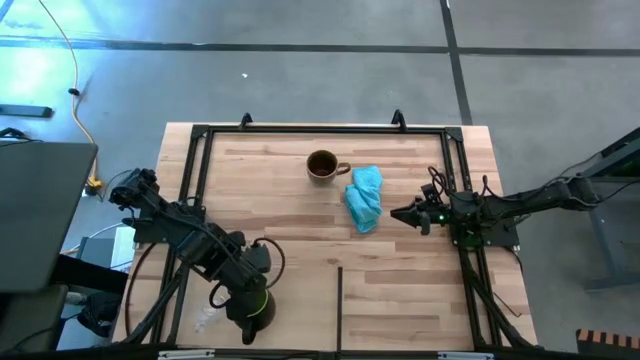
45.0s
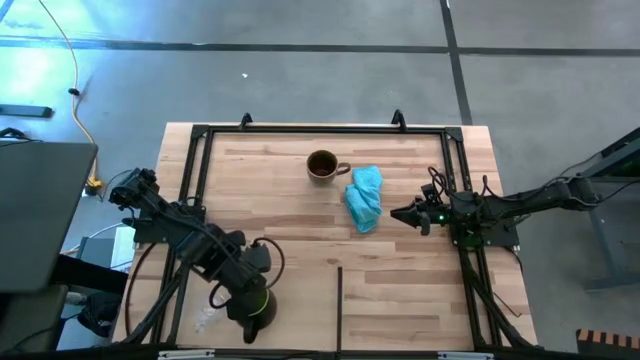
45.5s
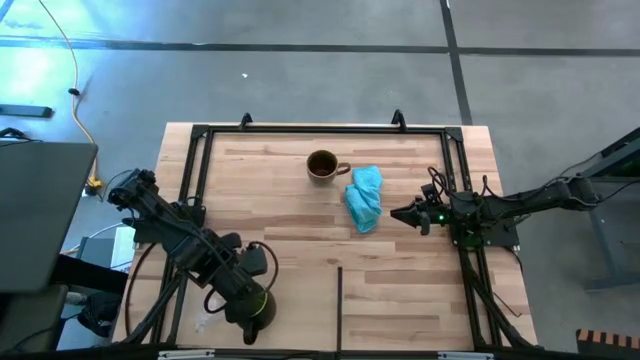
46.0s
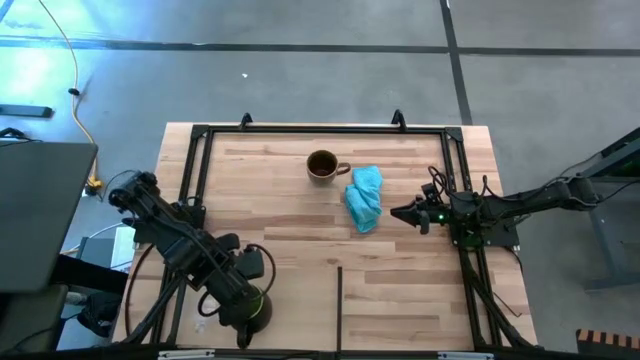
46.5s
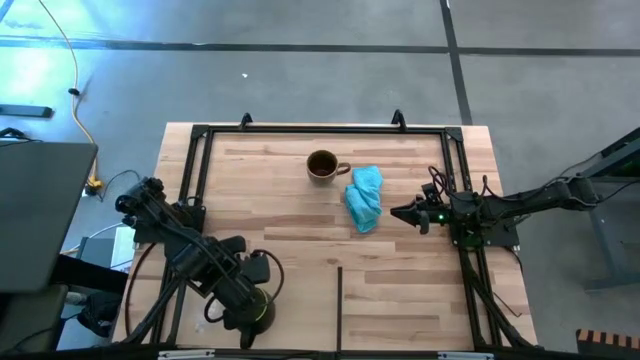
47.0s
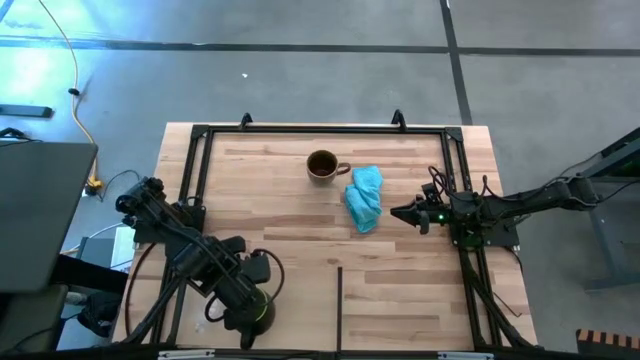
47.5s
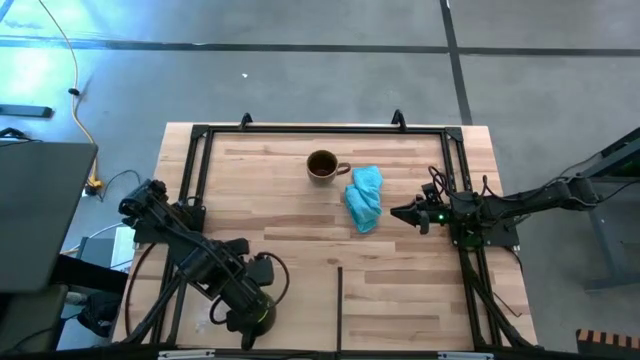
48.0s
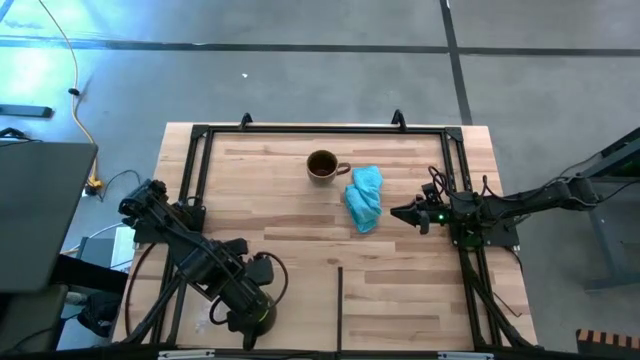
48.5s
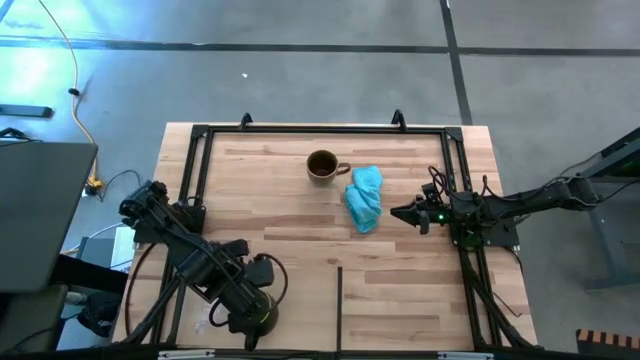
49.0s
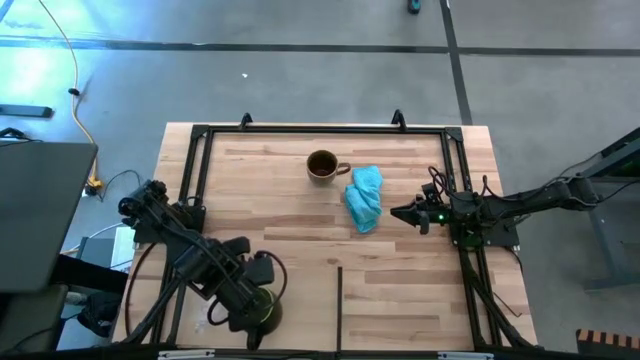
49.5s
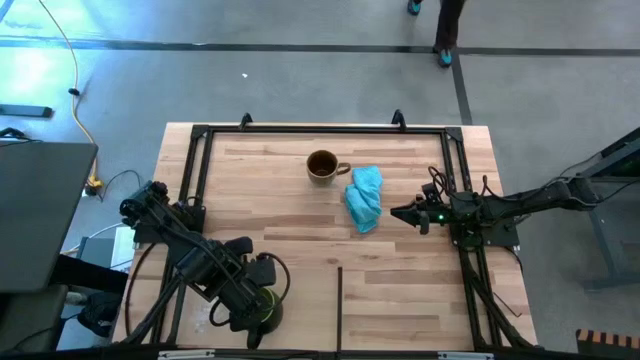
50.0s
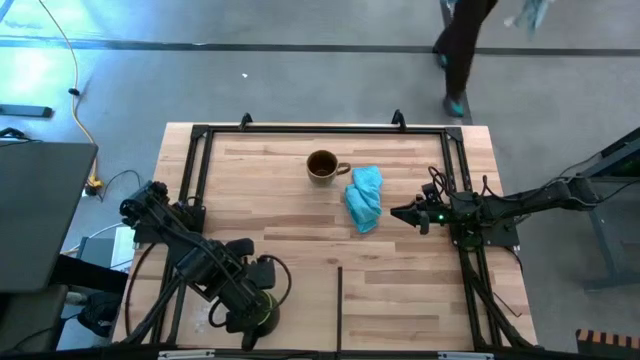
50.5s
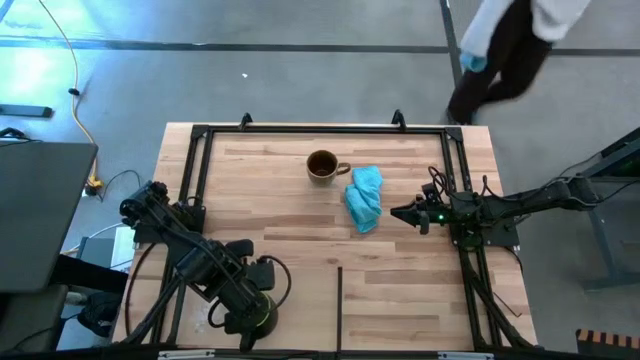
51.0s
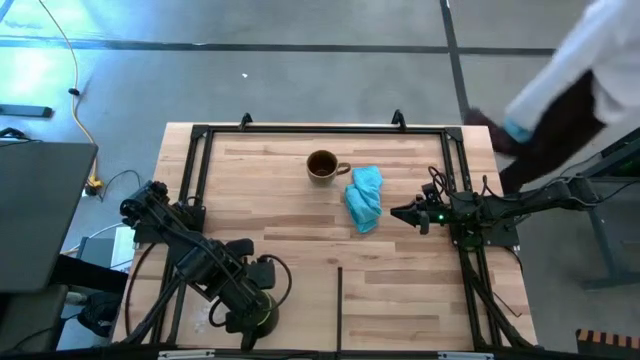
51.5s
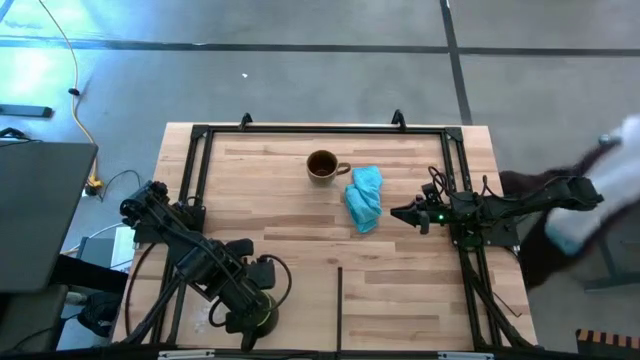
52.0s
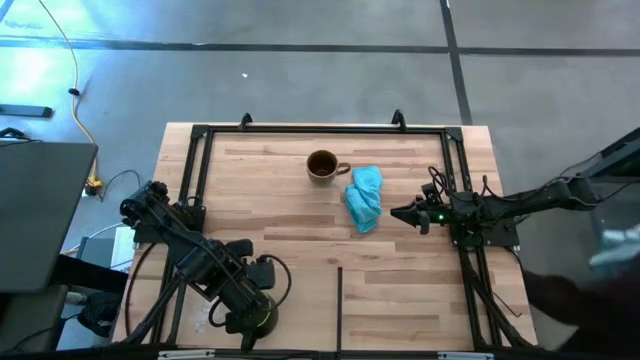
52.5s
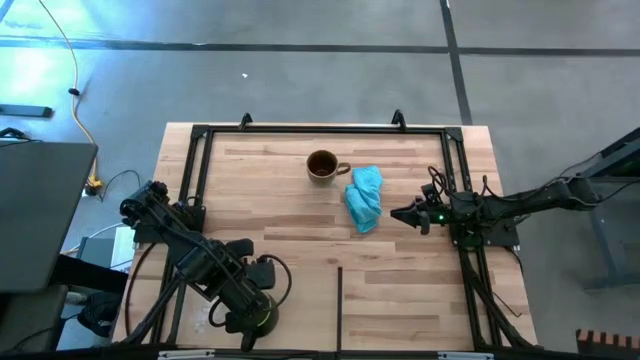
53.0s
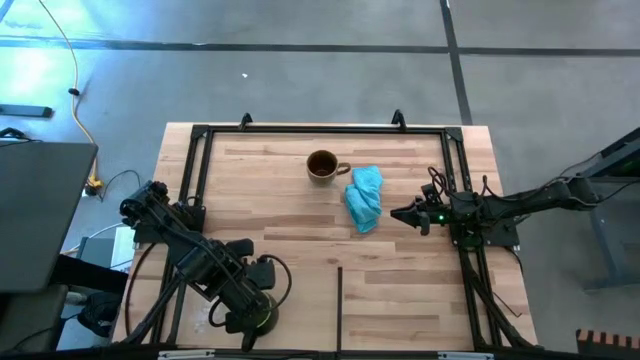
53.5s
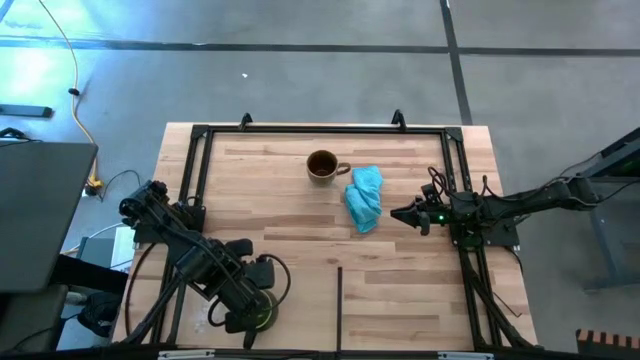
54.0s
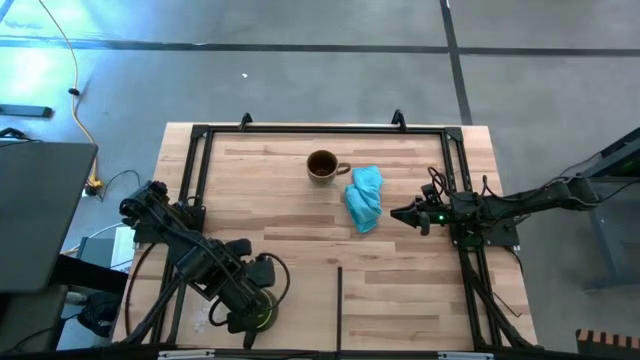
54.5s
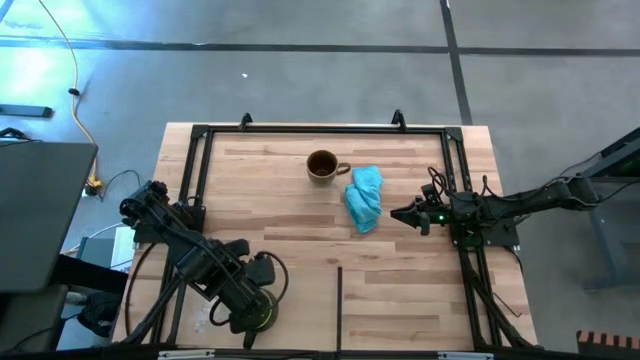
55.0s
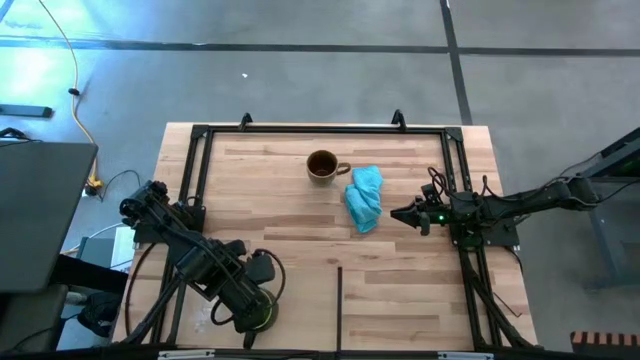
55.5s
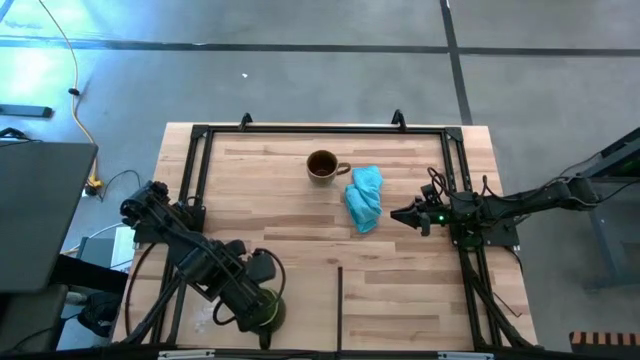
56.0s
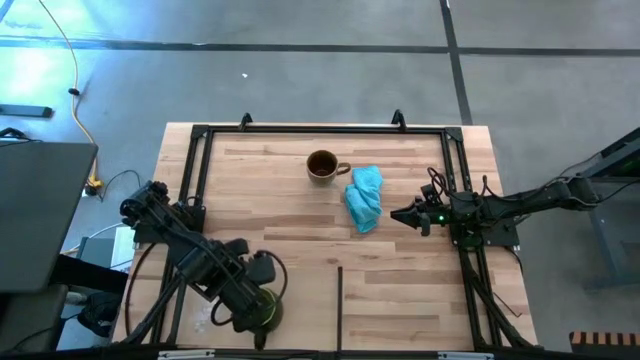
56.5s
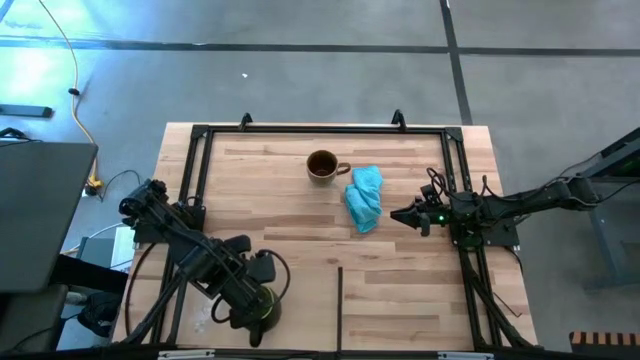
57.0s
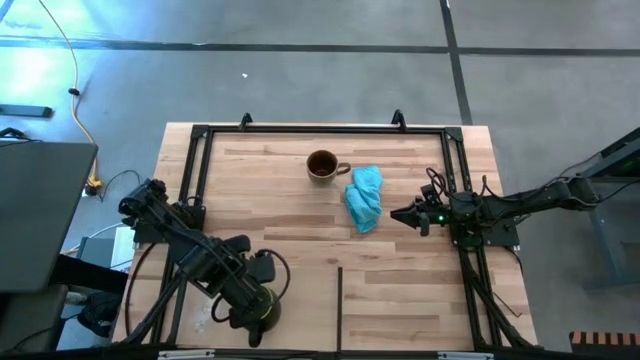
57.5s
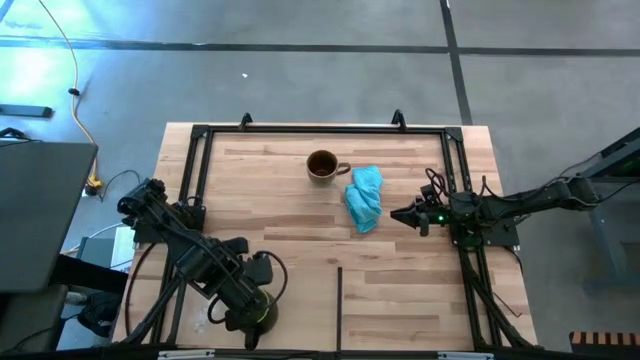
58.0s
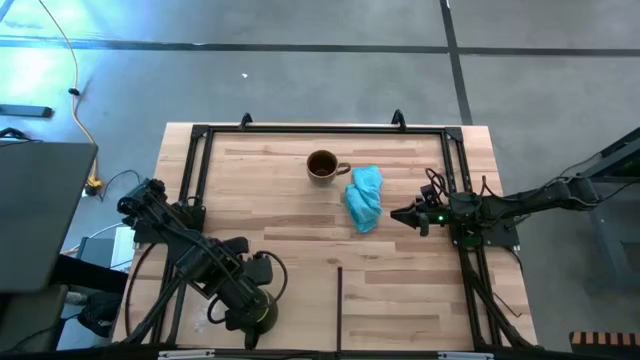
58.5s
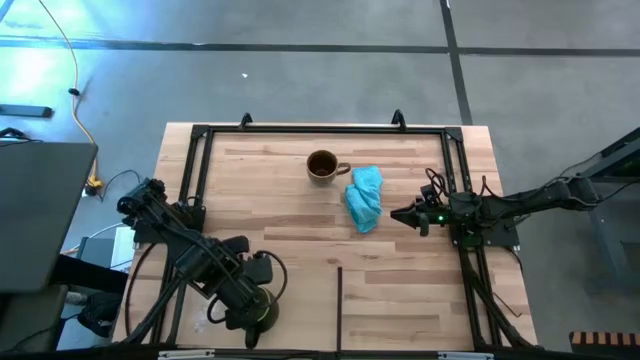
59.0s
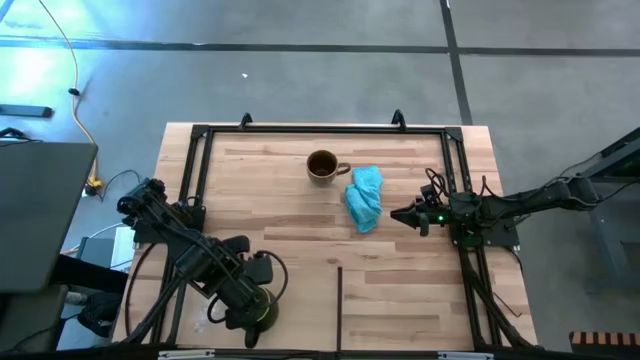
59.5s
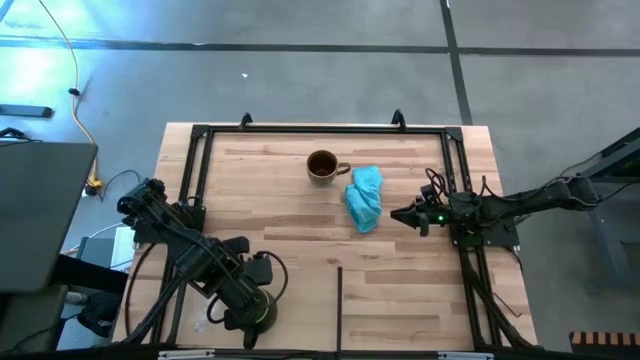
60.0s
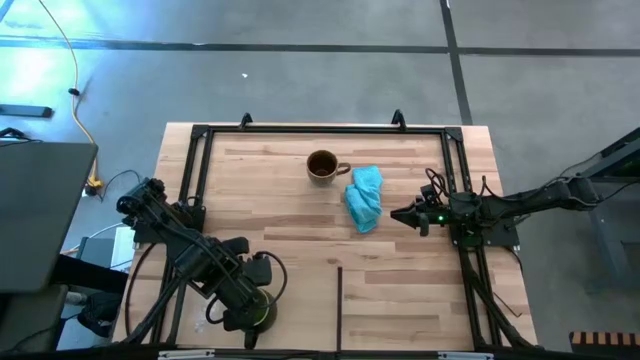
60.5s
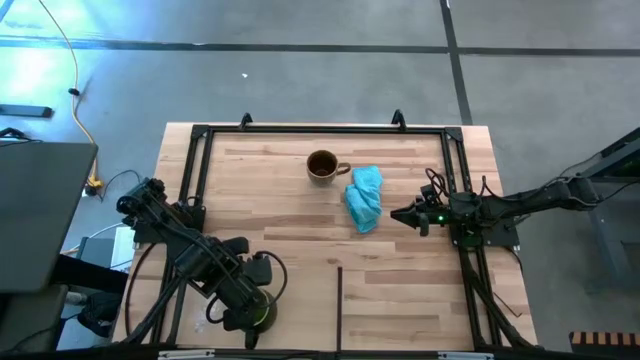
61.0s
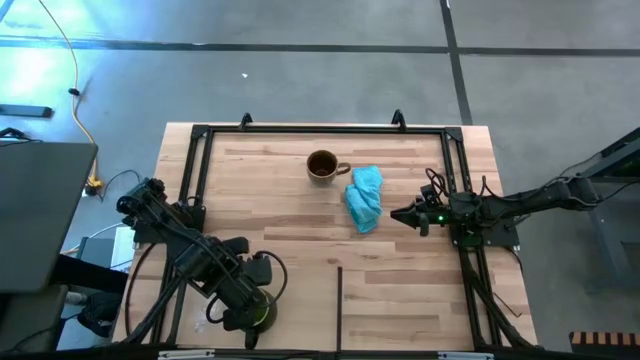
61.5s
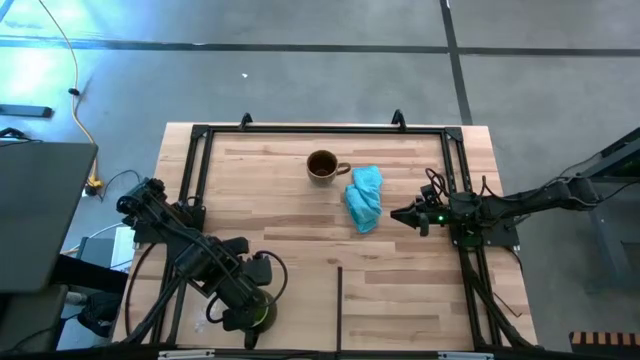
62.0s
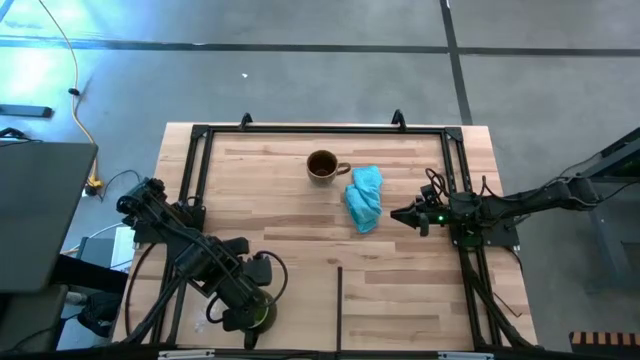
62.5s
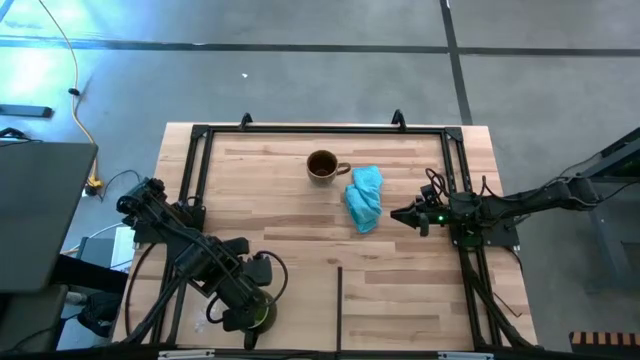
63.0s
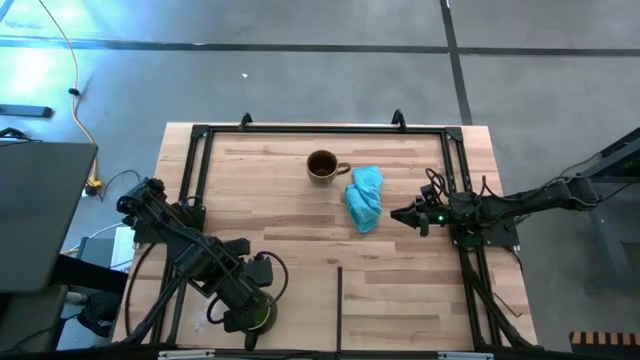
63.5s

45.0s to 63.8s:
Task: Stack small to large cups/mugs on shelf
Put the black mug on the shelf
